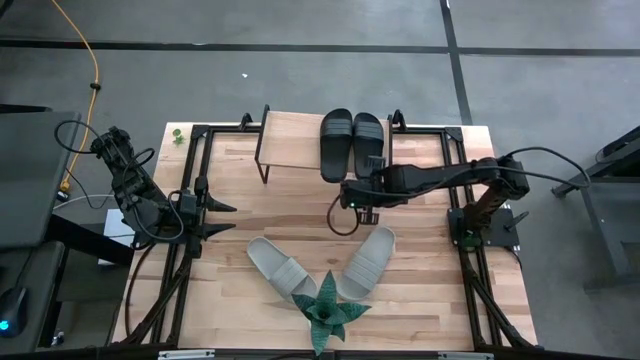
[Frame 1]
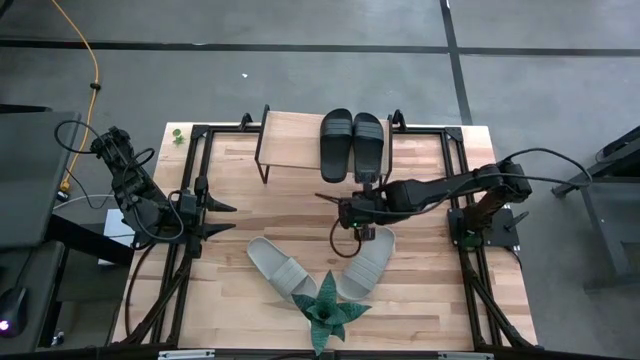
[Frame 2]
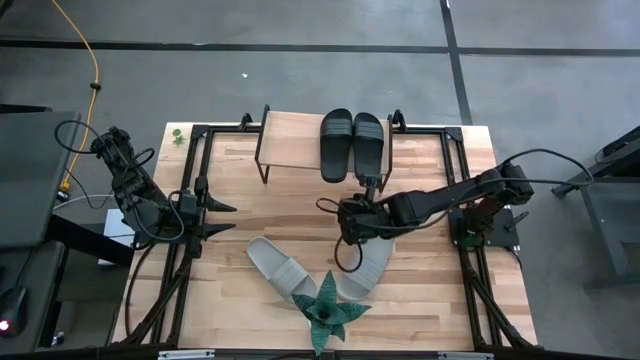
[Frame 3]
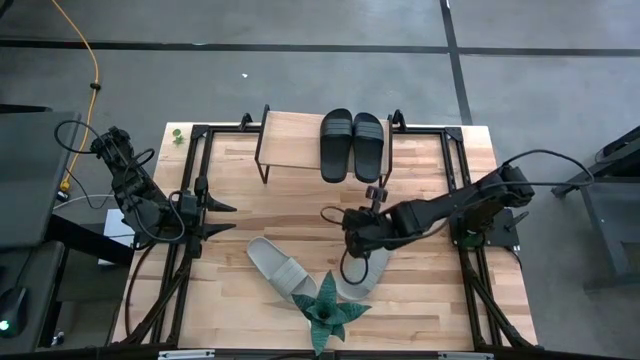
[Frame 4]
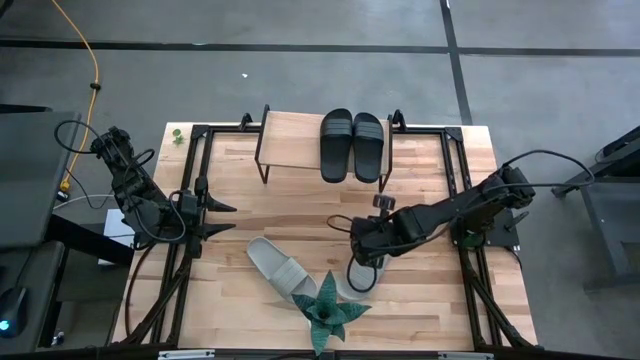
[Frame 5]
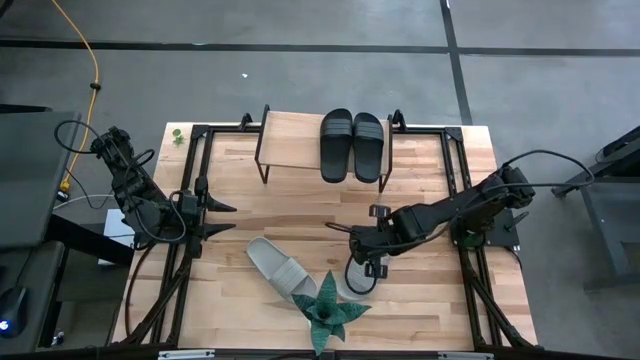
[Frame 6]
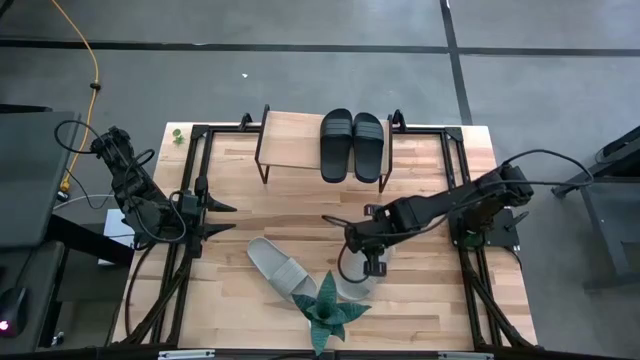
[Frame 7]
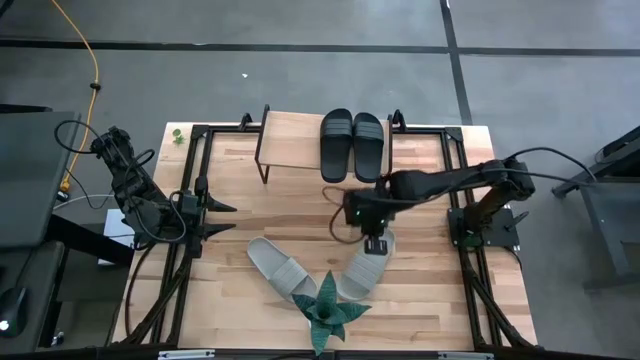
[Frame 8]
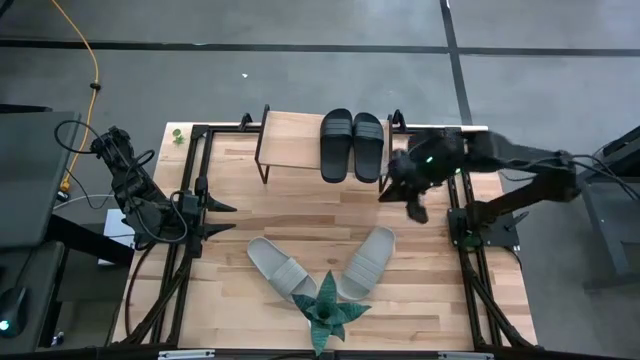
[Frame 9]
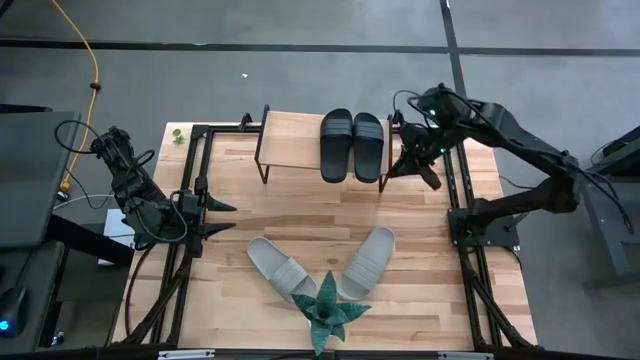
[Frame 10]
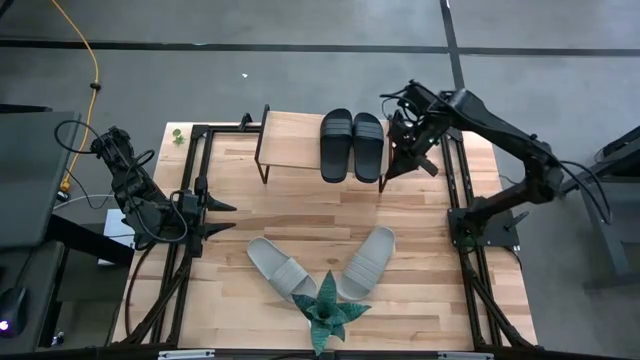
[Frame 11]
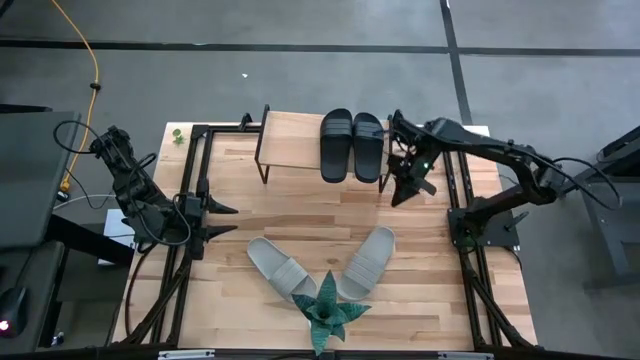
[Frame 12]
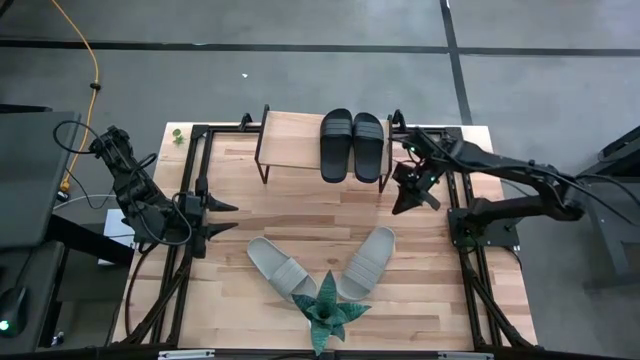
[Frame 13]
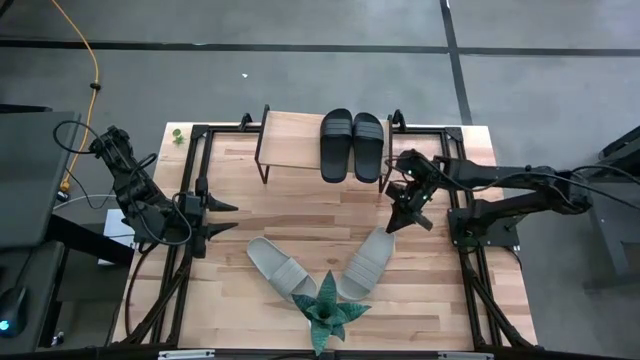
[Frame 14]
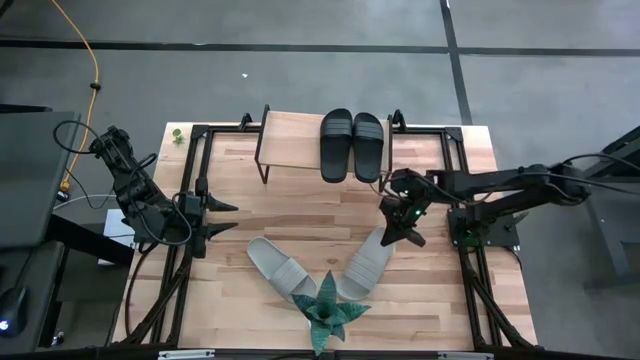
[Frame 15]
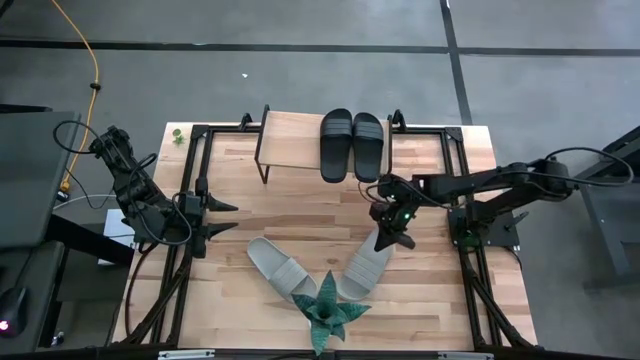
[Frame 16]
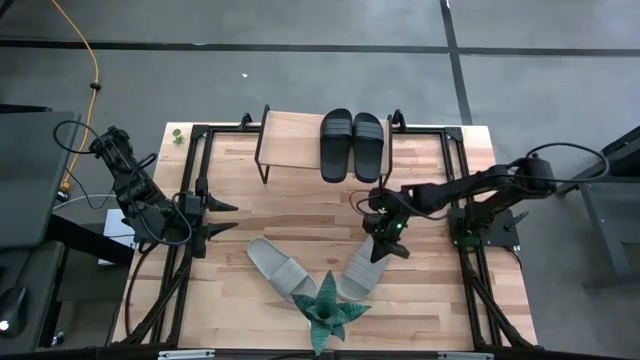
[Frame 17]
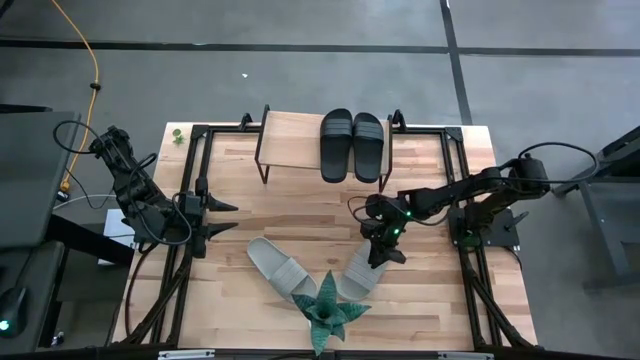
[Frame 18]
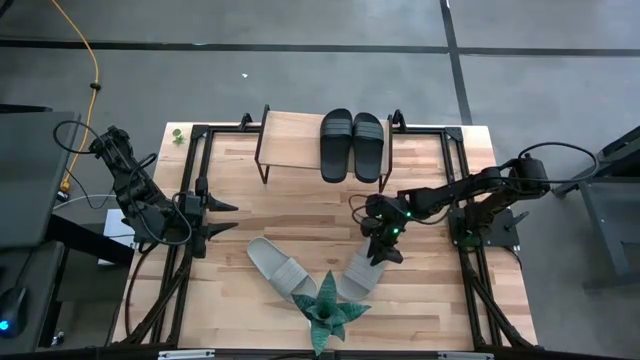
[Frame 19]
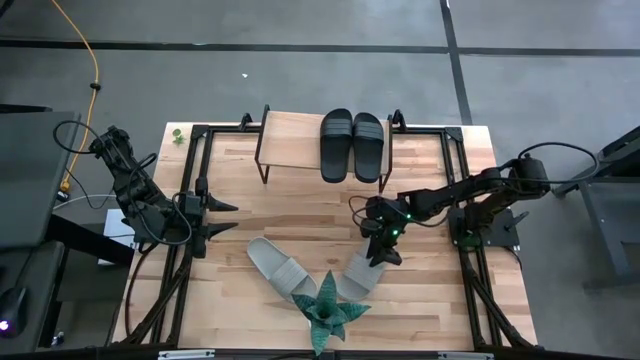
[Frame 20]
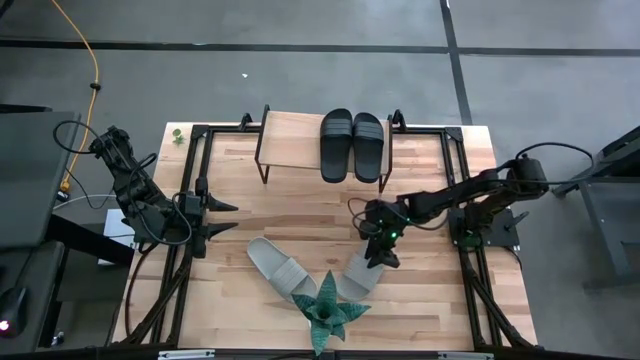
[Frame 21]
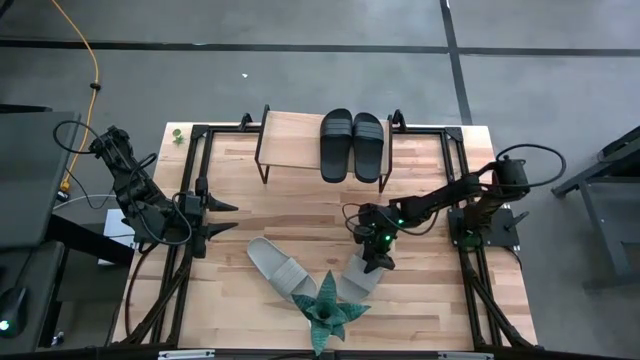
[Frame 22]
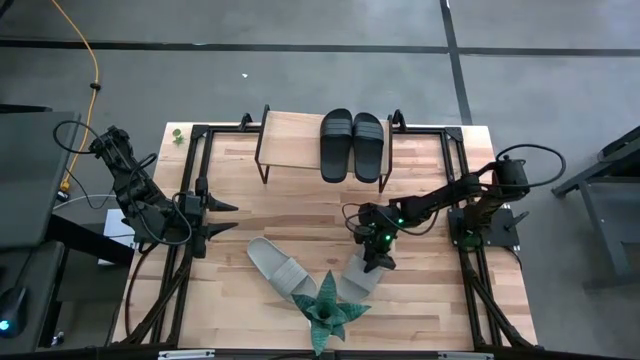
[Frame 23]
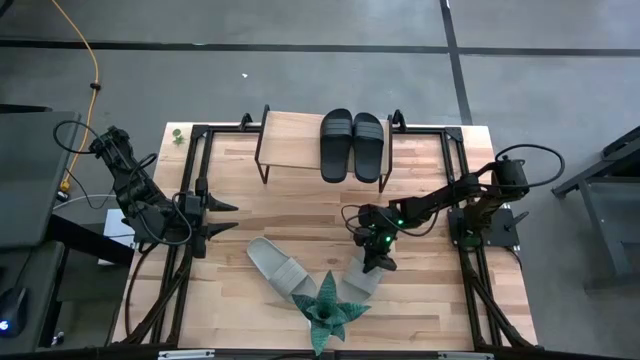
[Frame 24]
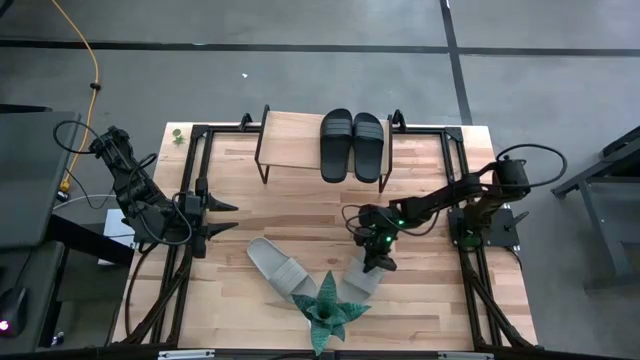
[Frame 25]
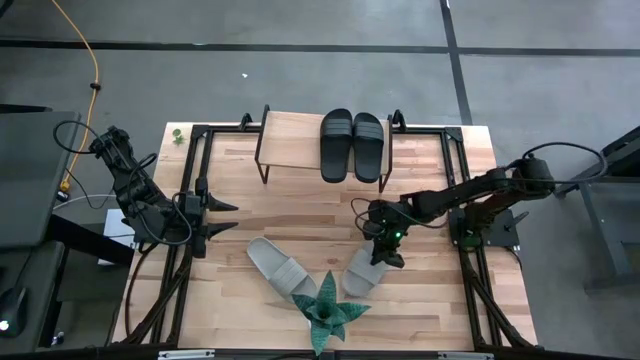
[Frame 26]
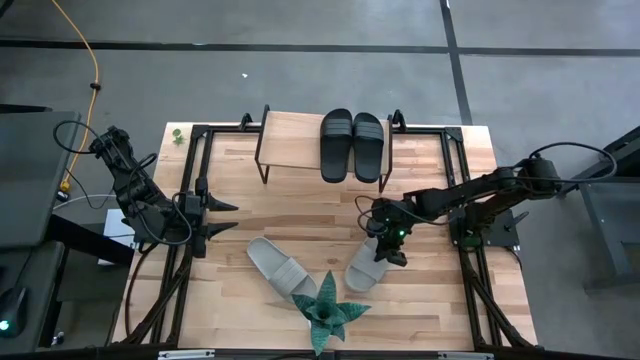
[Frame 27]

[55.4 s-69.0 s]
Task: Pick and place slides into the shelf
Put the right gray slipper on the shelf

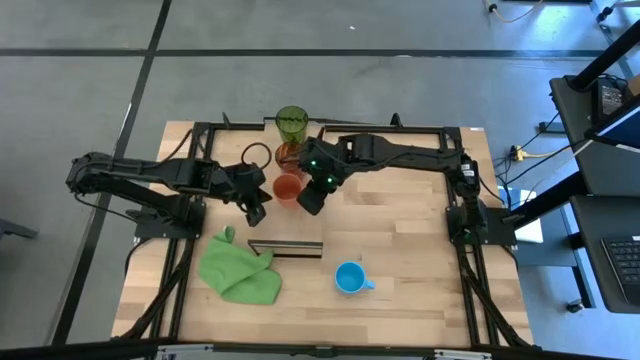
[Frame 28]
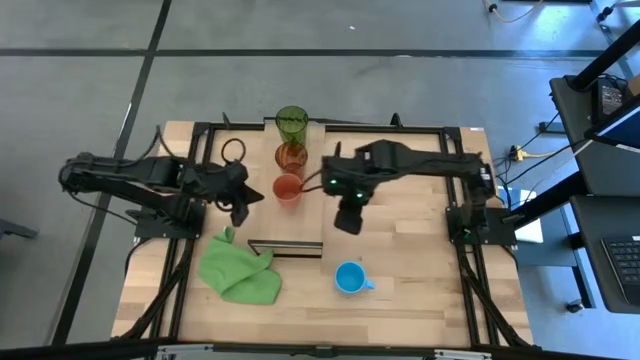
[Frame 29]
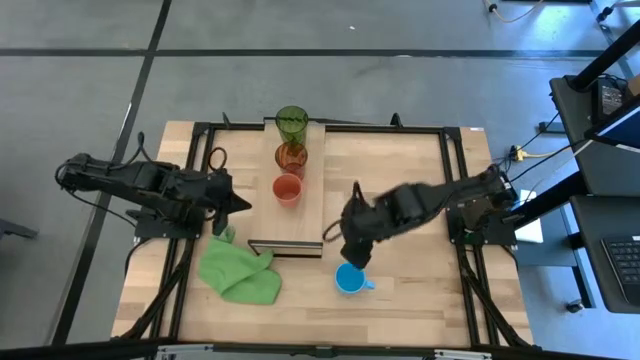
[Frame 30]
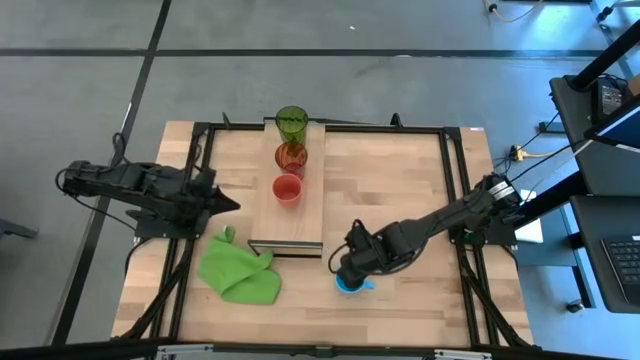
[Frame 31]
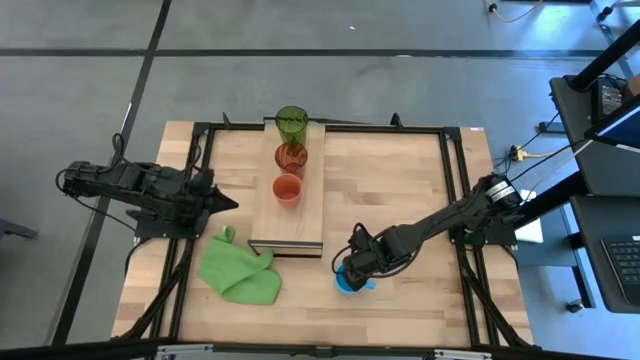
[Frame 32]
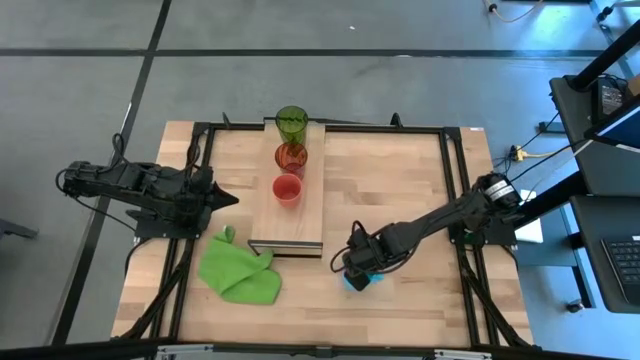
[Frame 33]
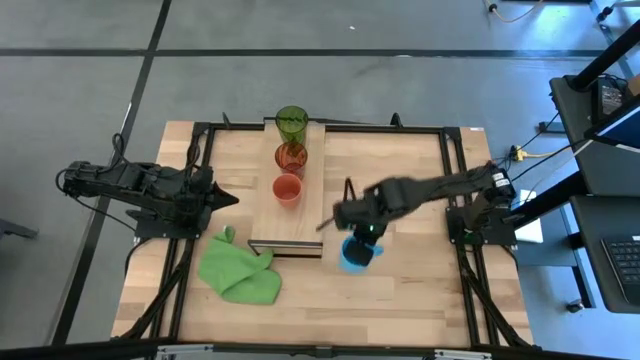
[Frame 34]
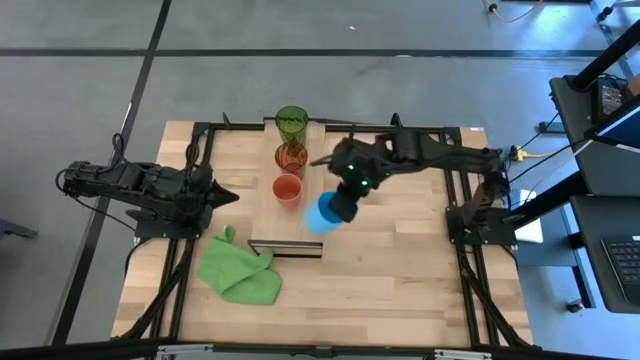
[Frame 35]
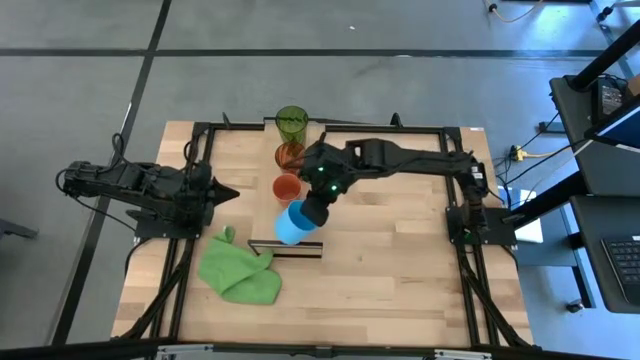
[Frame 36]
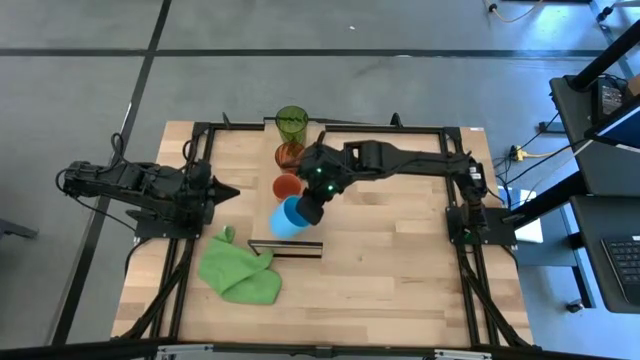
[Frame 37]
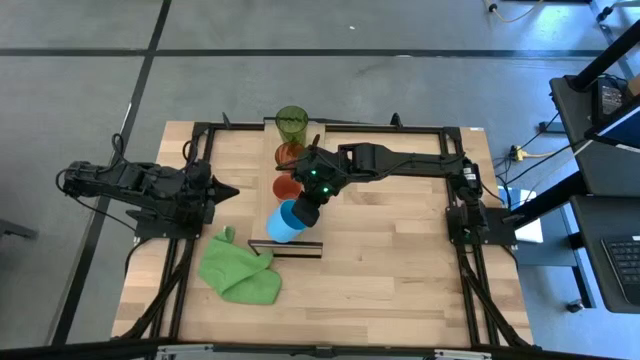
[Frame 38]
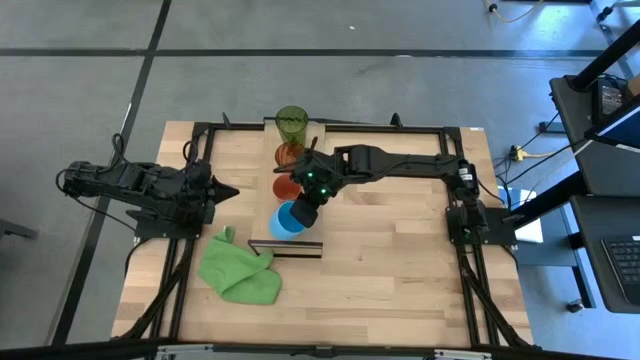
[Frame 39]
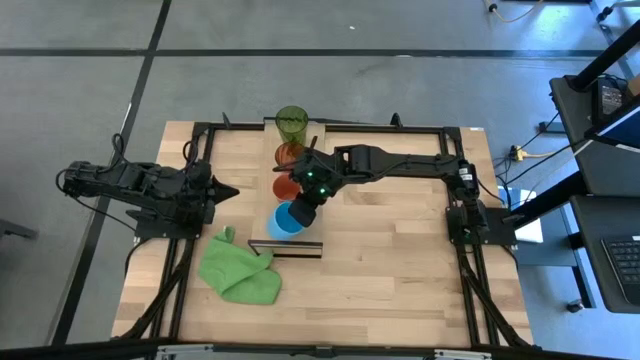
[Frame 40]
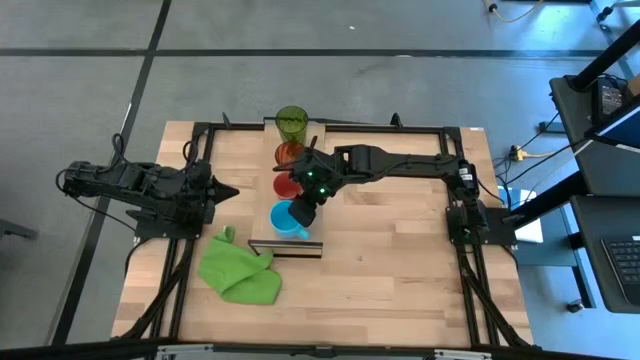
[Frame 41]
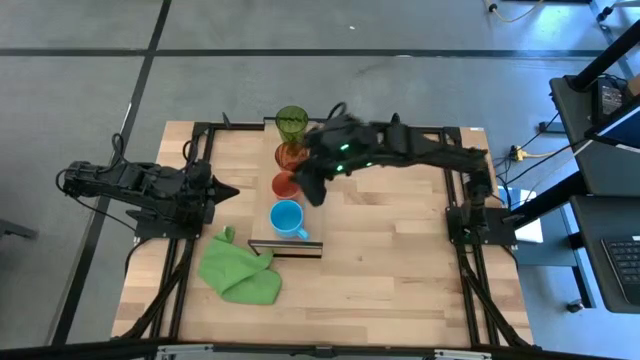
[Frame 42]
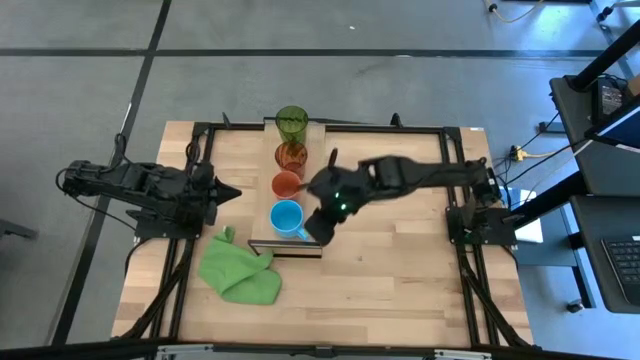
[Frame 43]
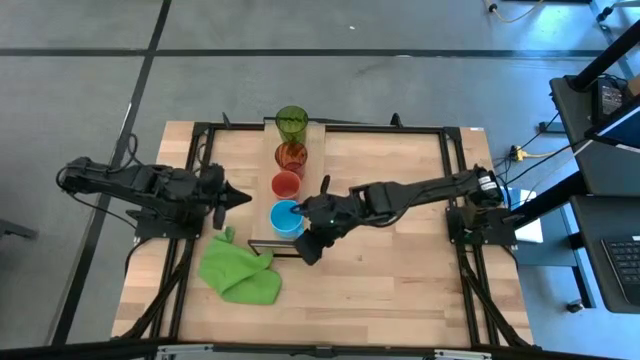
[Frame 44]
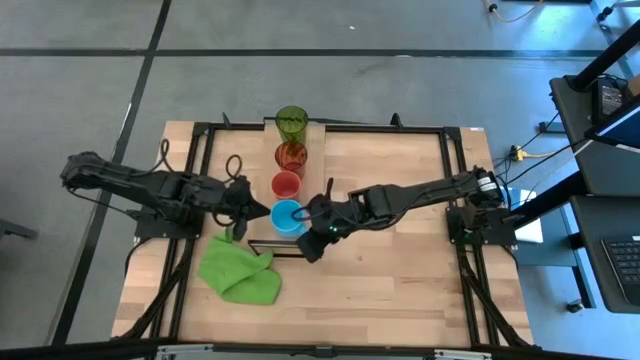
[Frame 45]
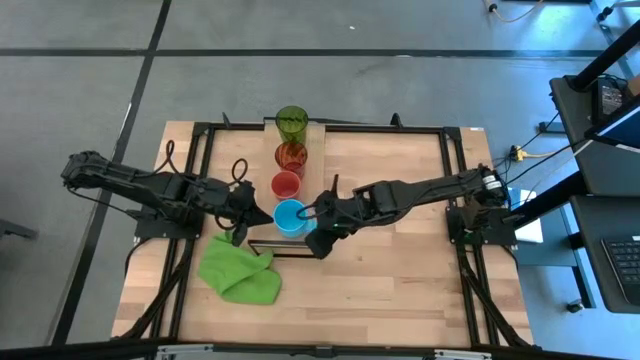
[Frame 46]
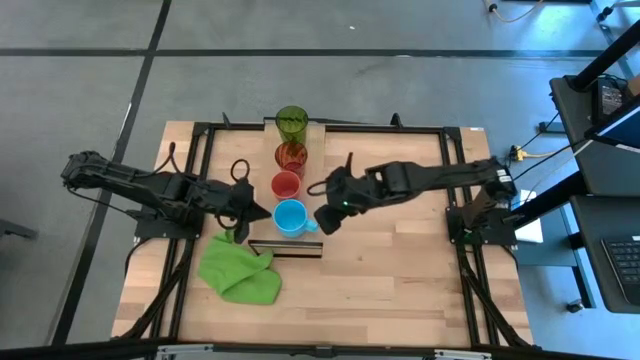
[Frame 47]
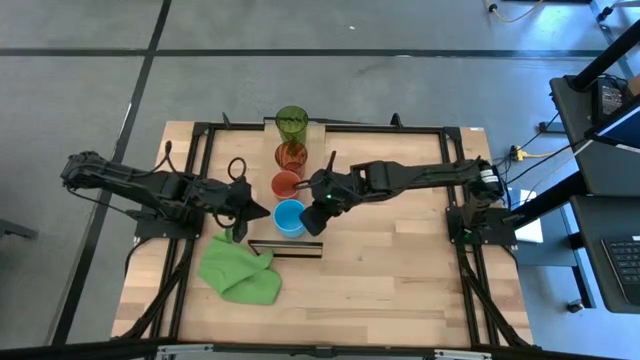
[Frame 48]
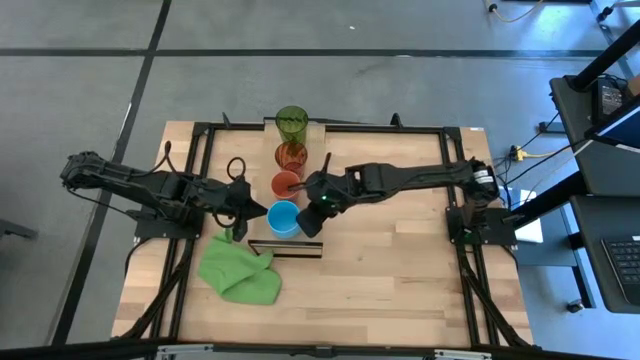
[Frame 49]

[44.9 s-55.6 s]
Task: Stack small to large cups/mugs on shelf
Put the blue mug on the shelf
